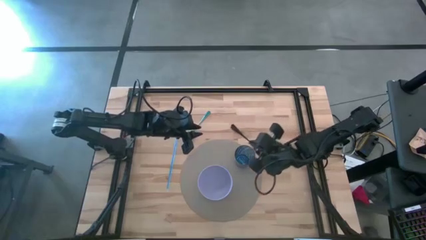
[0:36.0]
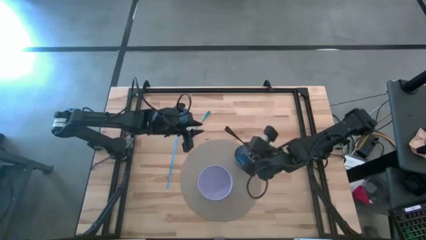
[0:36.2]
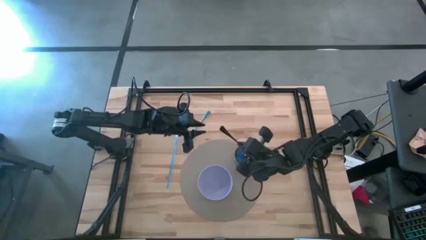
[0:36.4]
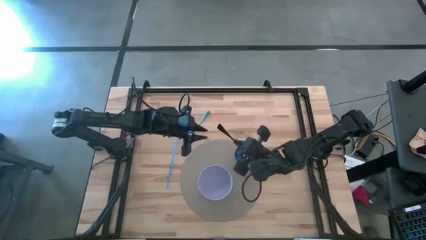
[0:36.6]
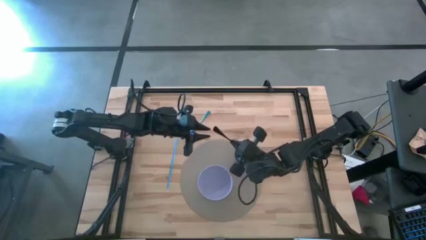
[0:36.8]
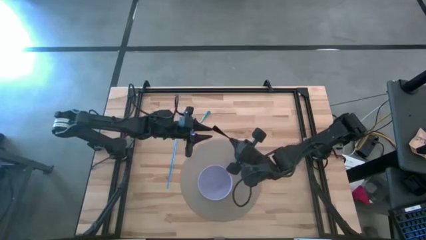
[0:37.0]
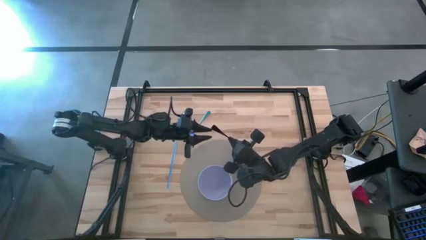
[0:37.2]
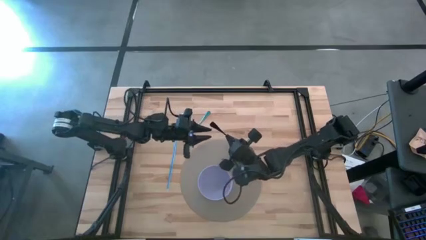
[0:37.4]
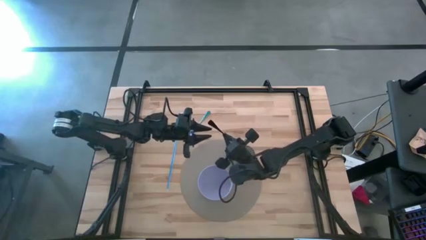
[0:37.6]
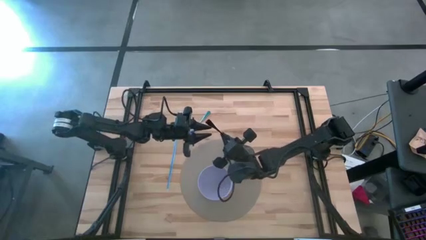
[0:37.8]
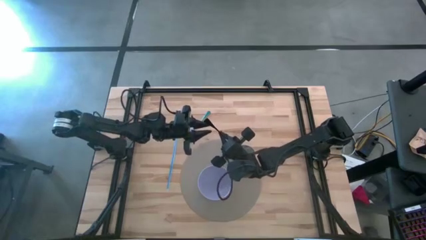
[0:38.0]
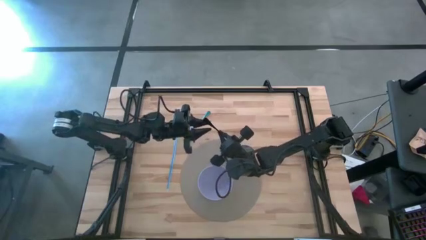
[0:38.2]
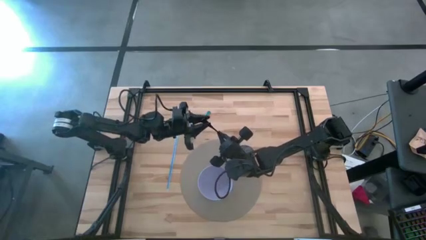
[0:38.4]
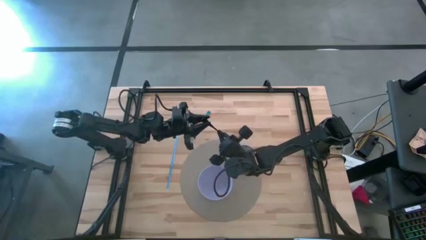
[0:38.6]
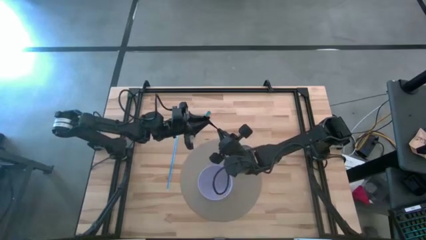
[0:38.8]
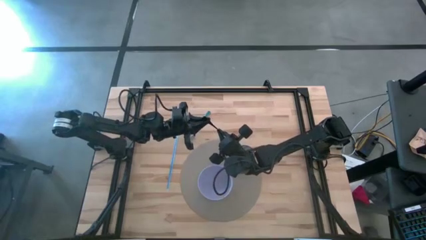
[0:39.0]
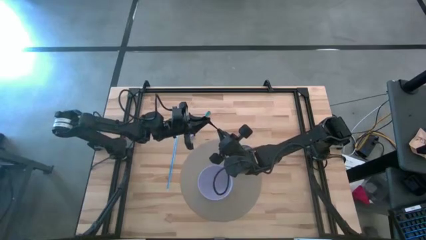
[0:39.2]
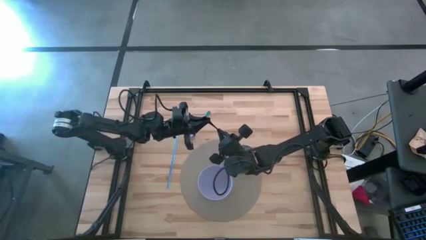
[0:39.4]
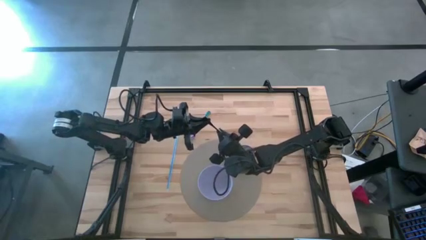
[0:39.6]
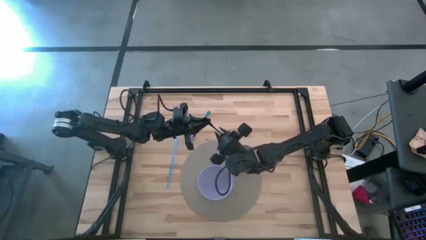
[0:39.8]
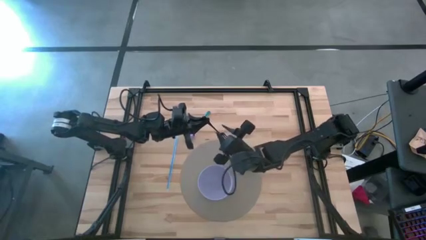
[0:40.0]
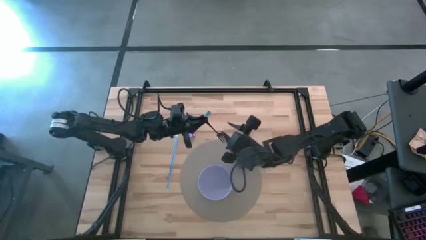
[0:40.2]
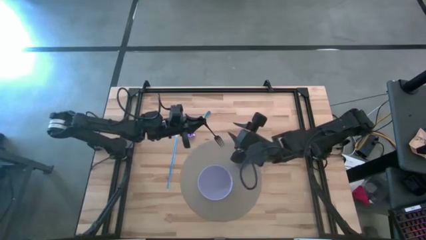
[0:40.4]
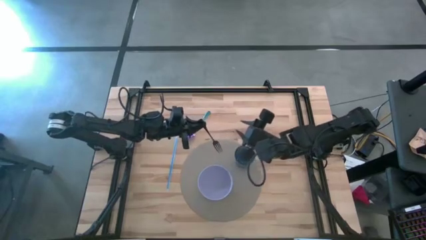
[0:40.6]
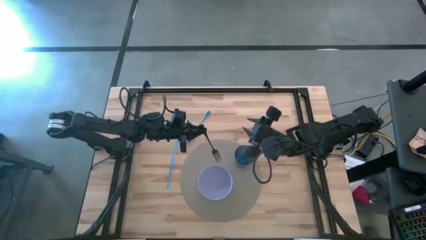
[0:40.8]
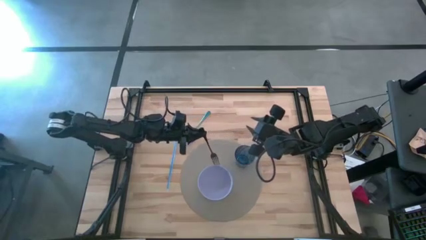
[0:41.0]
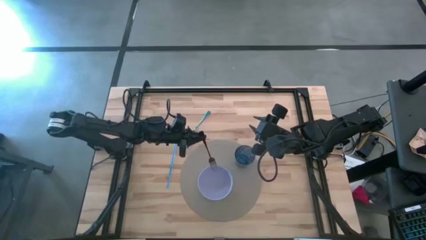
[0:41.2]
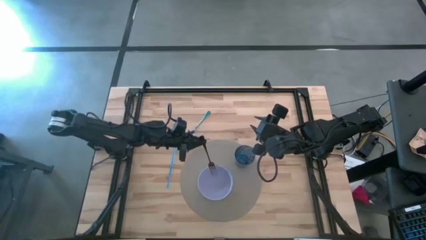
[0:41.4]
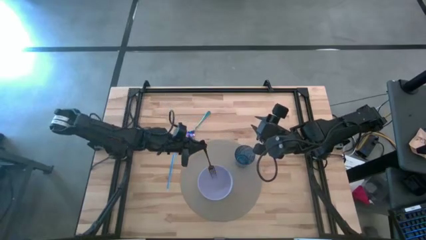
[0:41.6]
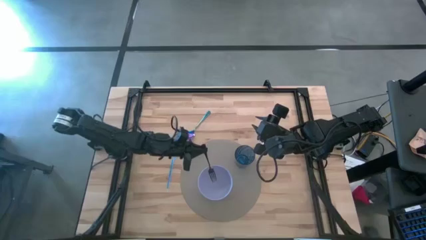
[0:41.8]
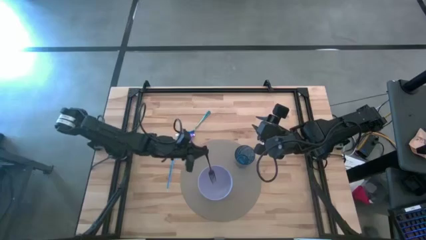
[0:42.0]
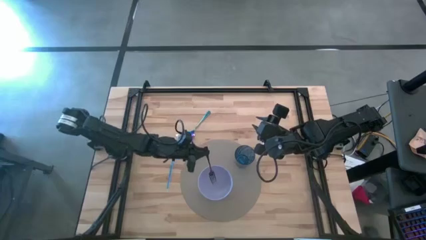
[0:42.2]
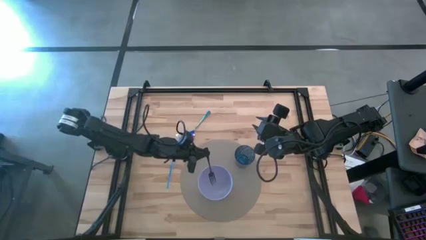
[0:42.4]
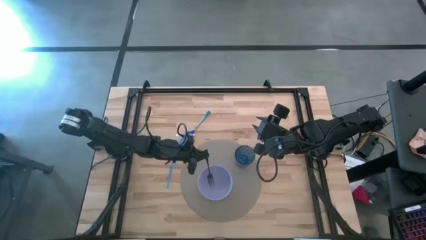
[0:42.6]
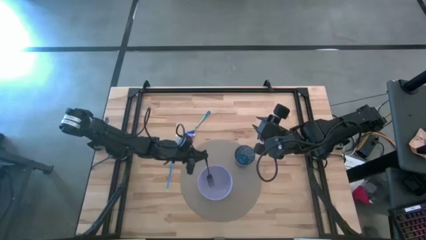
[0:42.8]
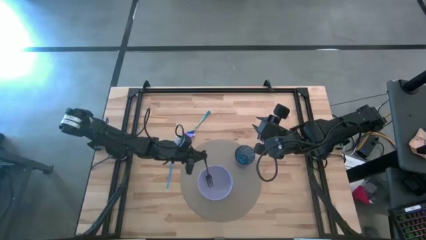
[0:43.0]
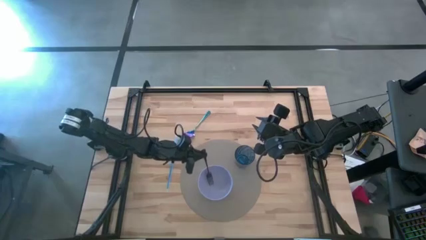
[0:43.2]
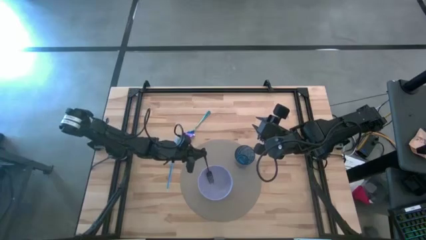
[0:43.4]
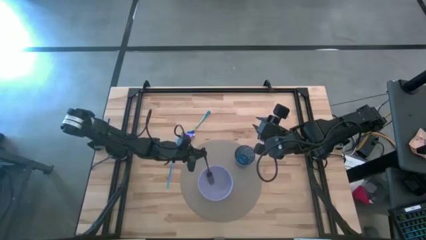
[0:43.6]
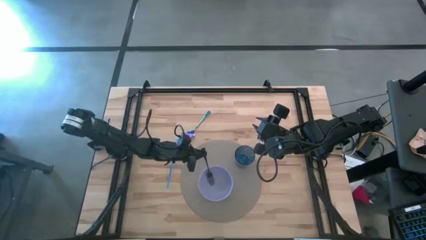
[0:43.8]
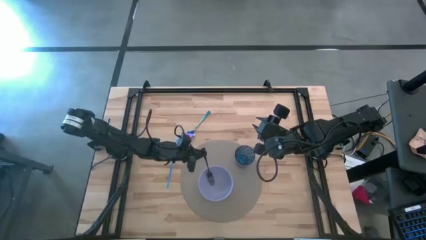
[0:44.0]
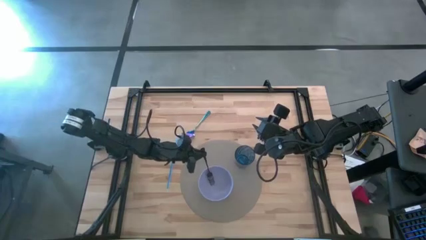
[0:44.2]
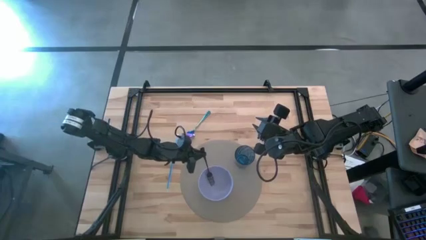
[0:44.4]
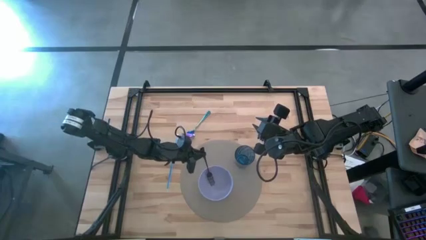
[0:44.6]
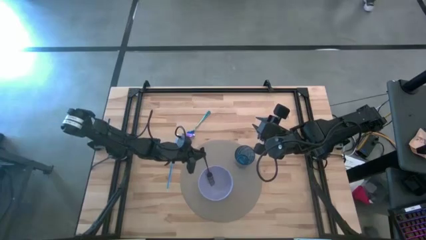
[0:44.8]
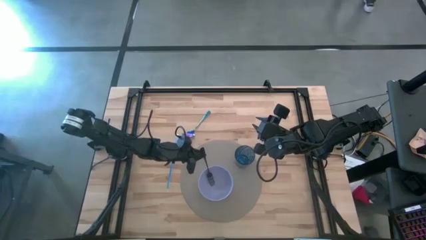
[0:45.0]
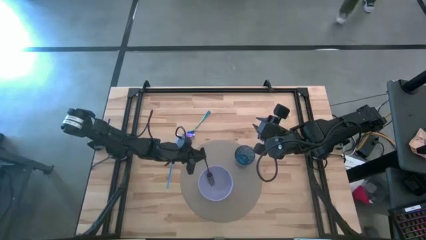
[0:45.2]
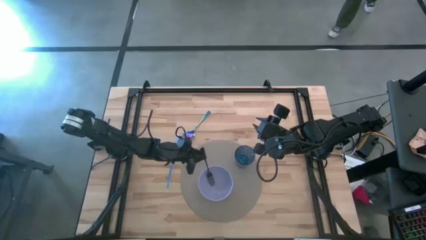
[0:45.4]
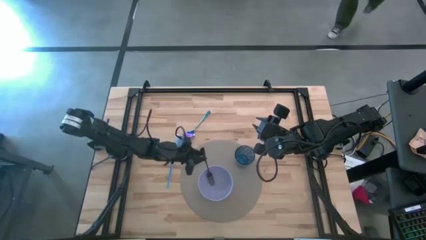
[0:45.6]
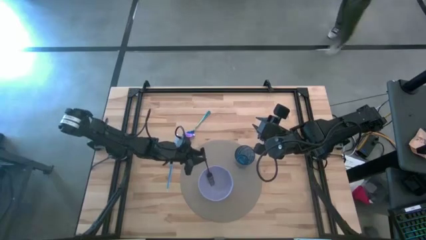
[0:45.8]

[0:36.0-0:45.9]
Task: Pick & Place Utensil
Put the fork into the bowl

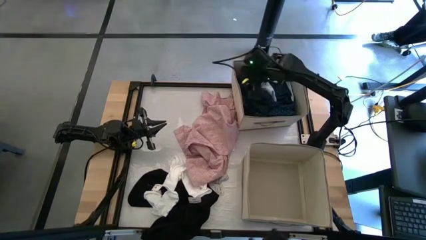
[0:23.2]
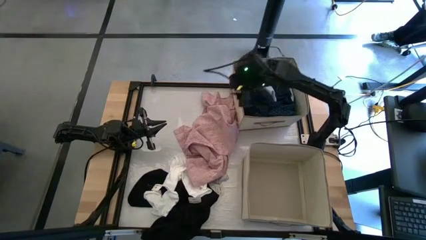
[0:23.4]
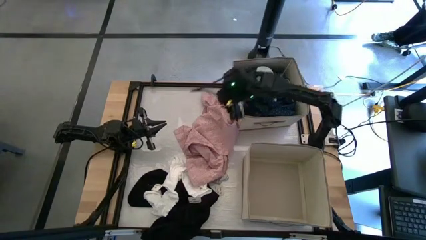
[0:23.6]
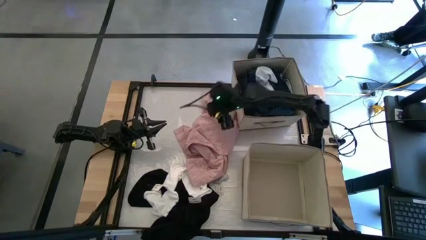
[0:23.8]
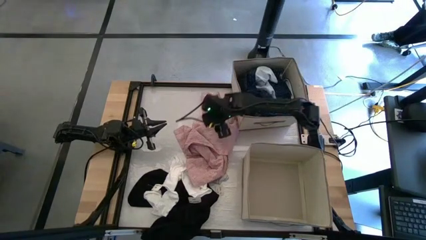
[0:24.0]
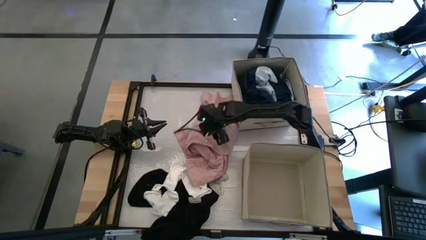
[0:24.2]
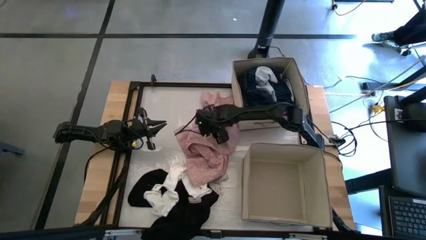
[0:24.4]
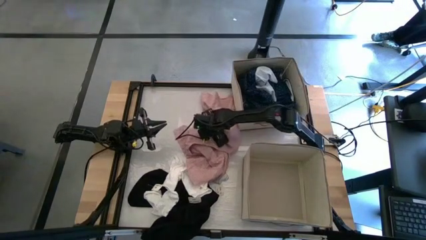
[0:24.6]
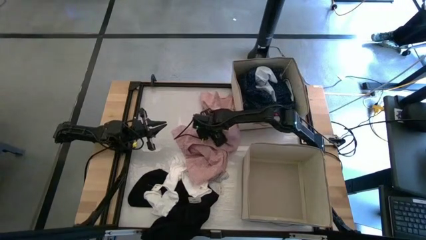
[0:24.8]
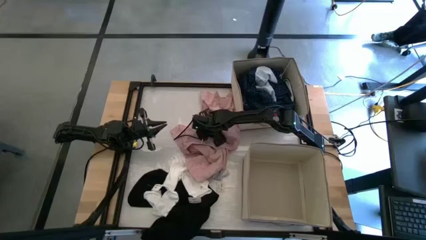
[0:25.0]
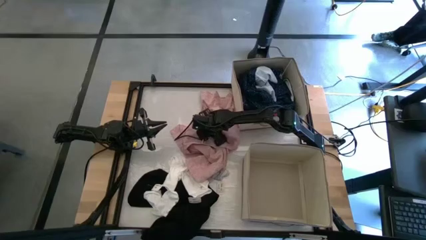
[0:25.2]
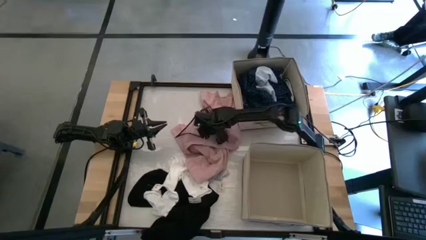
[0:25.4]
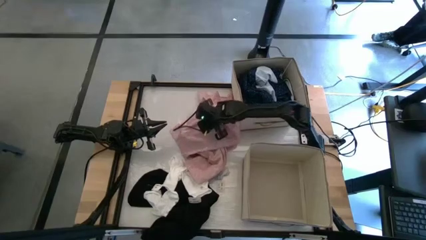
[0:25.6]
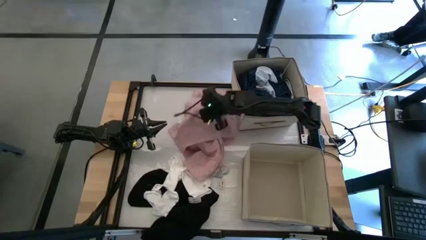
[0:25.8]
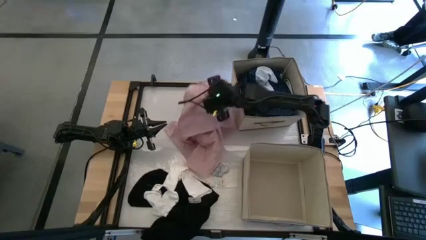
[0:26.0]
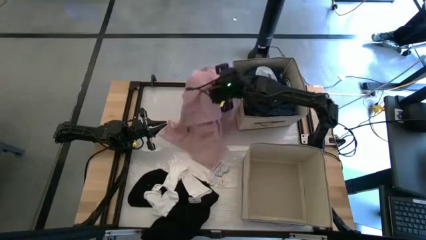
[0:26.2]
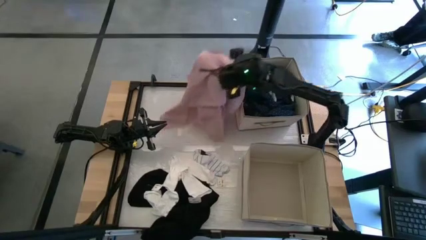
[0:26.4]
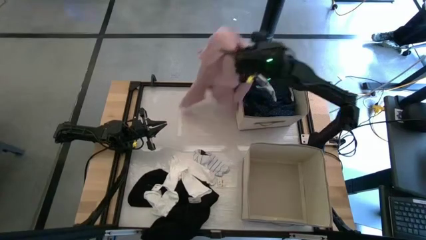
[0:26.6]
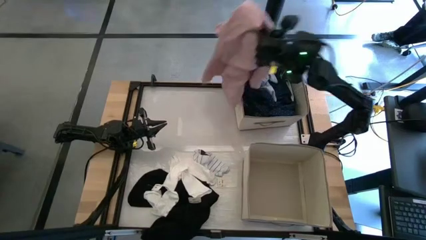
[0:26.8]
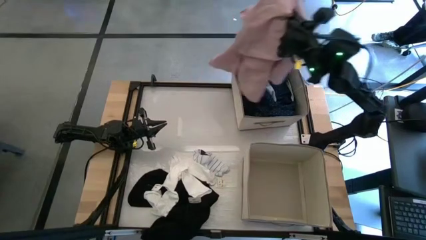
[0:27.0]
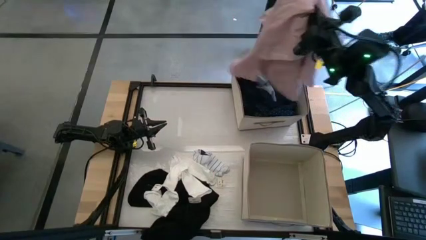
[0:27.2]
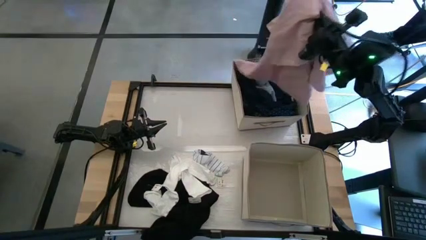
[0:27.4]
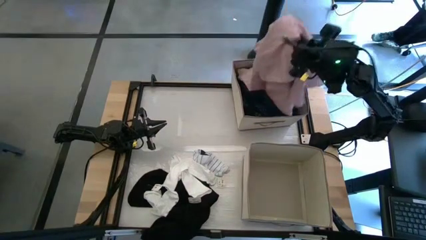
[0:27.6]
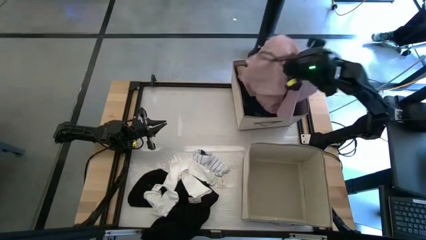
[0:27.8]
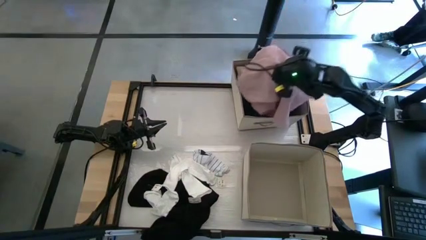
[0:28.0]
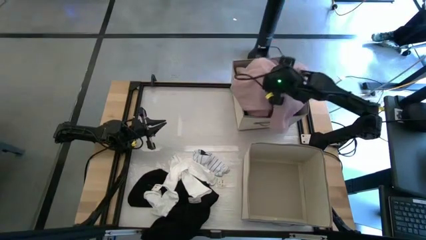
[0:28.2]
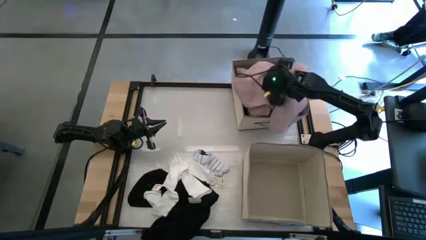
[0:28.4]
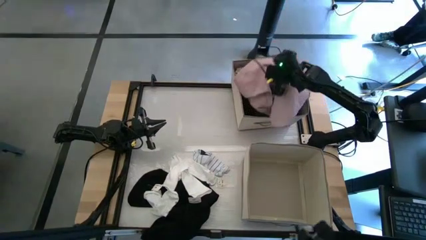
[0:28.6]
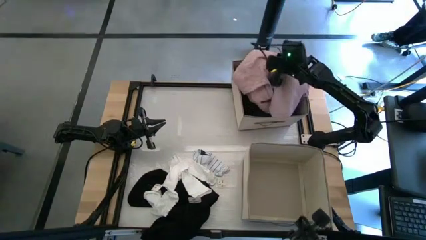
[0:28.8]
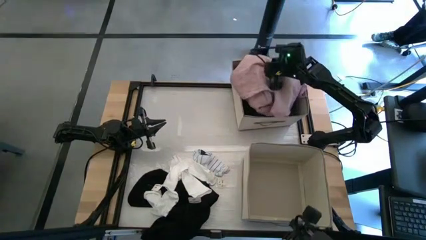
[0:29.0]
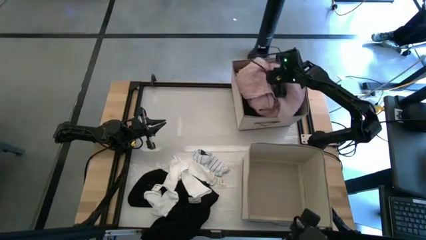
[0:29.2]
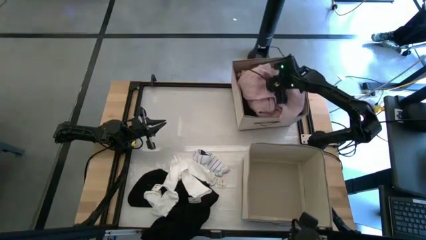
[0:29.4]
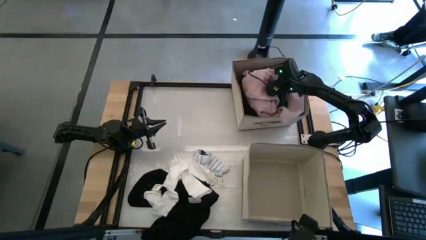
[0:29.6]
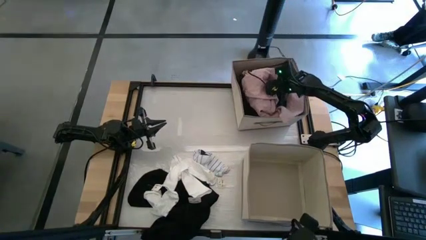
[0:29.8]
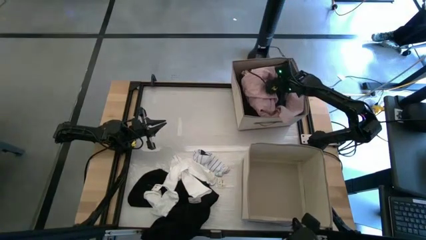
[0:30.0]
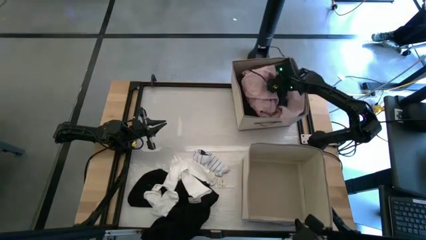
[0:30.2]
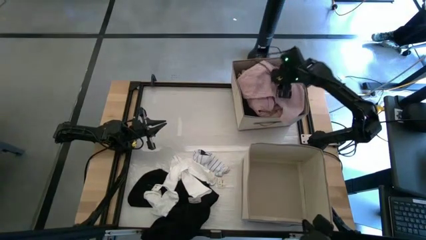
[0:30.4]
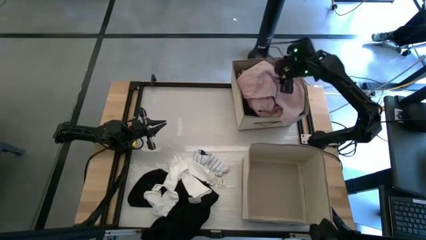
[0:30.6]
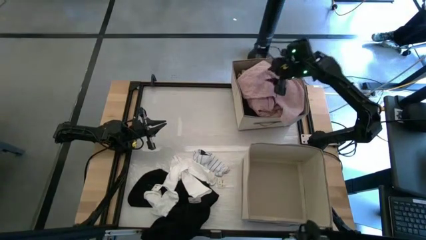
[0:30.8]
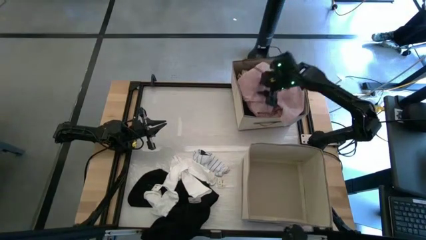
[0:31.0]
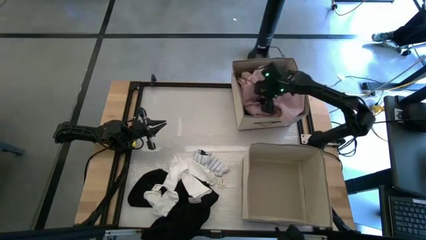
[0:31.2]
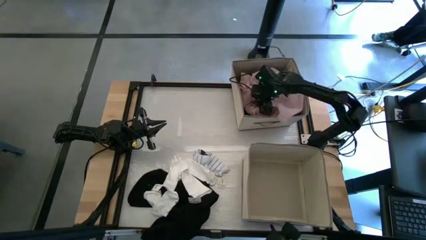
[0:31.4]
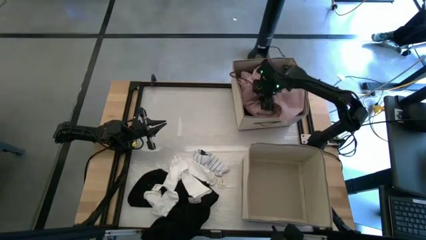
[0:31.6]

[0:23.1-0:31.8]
Task: Sort clothes
Put the pink shirt into the top laundry organizer
